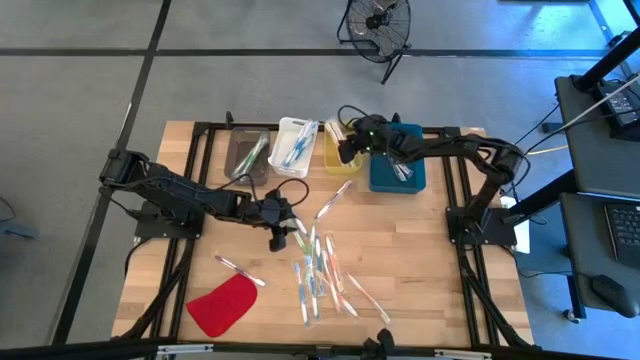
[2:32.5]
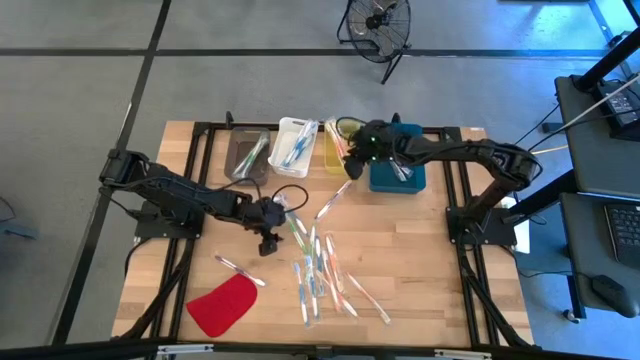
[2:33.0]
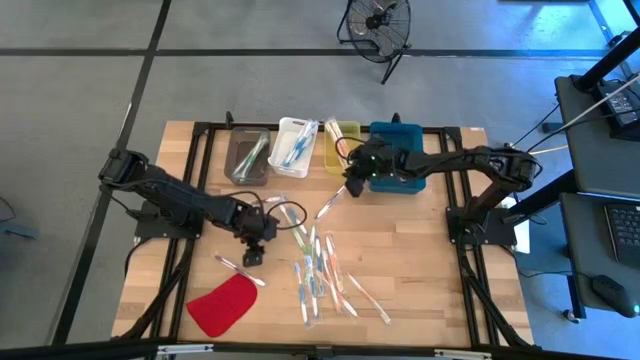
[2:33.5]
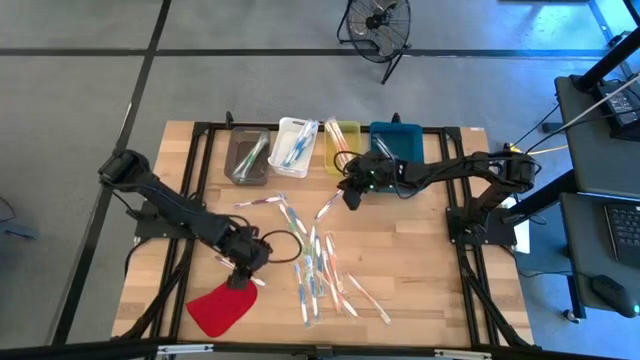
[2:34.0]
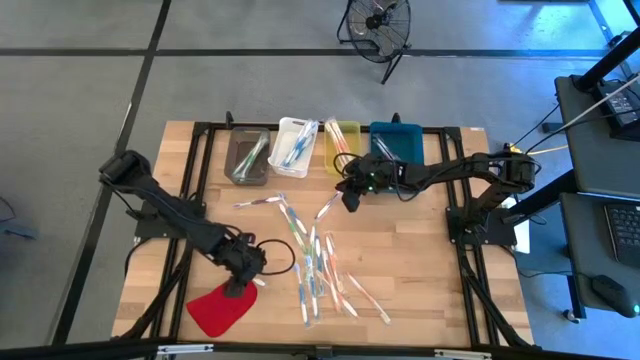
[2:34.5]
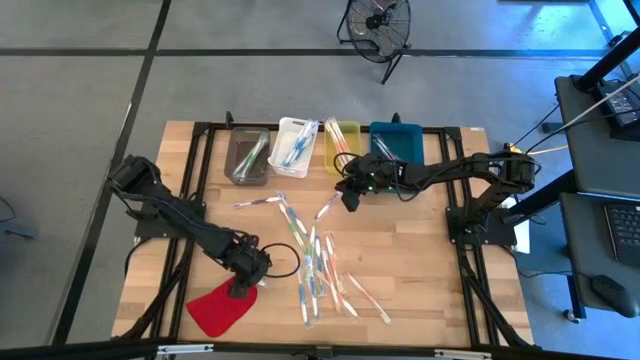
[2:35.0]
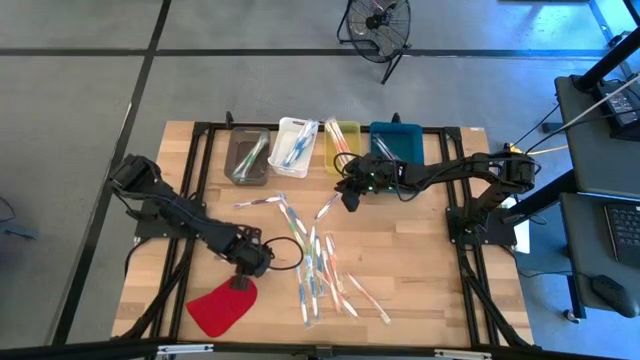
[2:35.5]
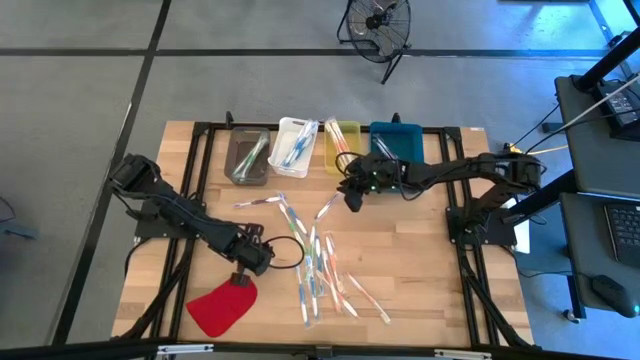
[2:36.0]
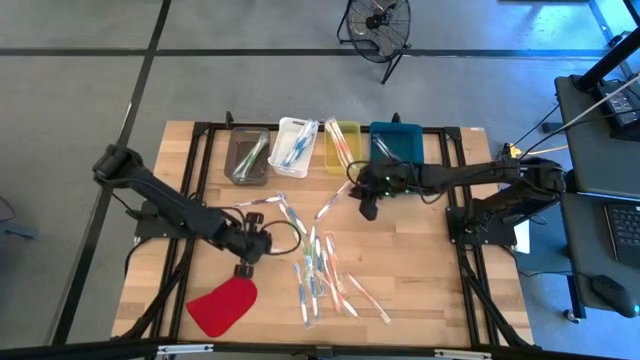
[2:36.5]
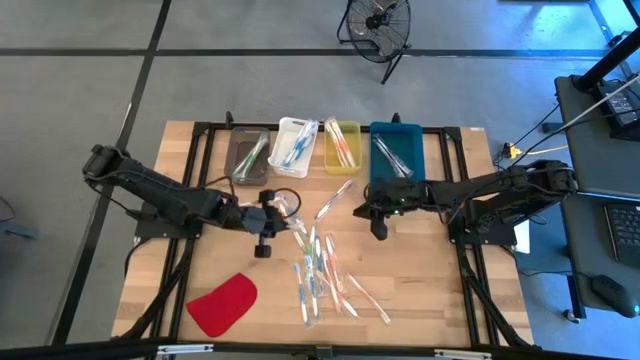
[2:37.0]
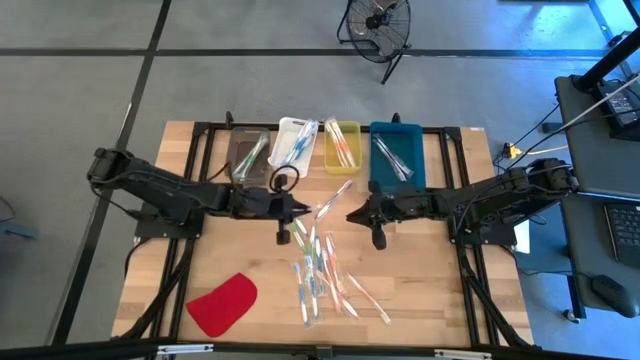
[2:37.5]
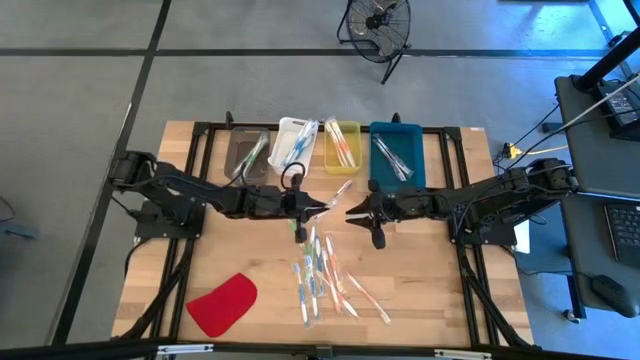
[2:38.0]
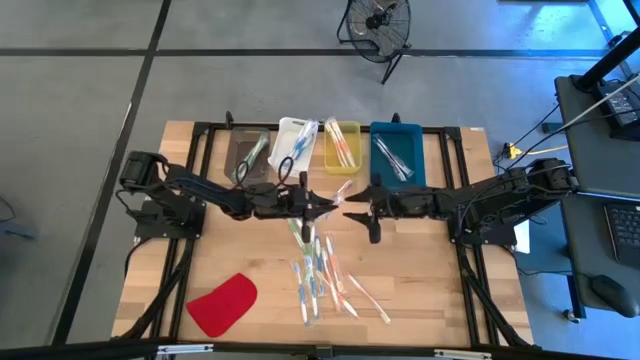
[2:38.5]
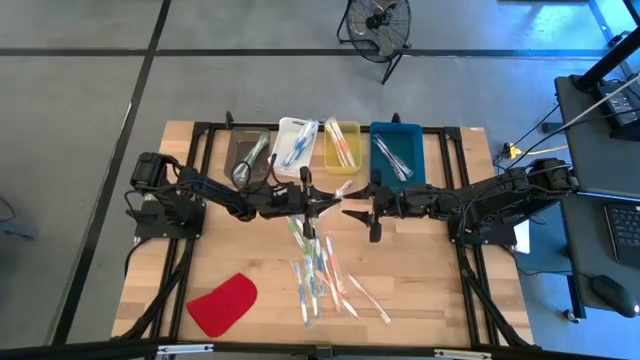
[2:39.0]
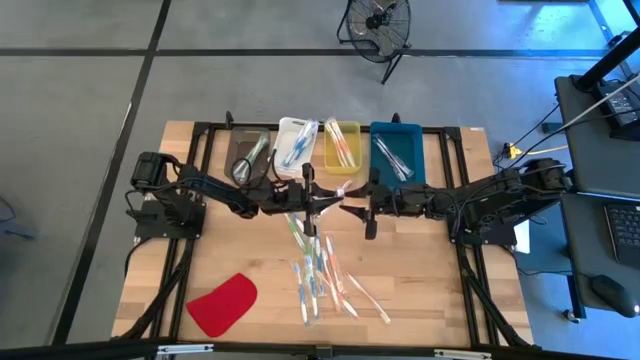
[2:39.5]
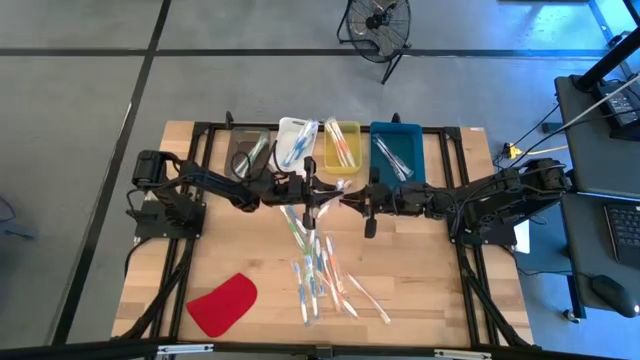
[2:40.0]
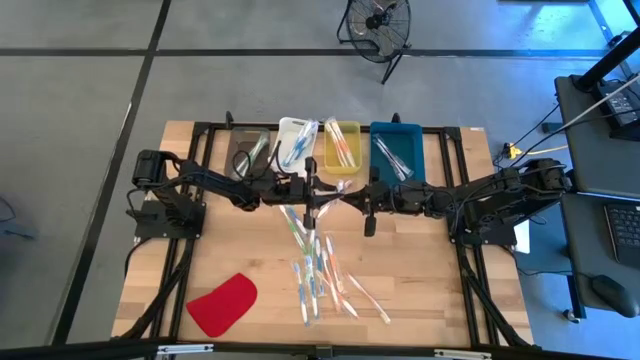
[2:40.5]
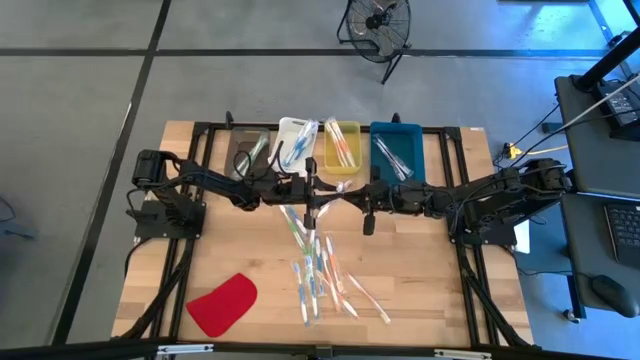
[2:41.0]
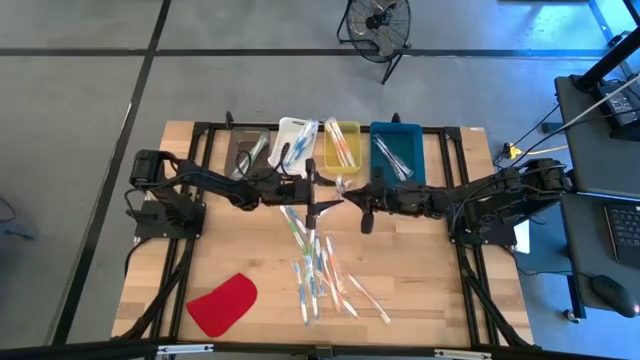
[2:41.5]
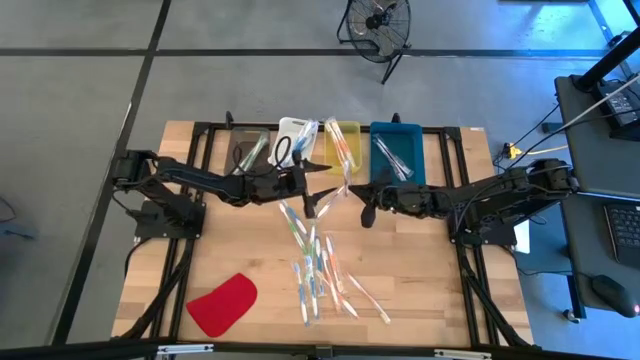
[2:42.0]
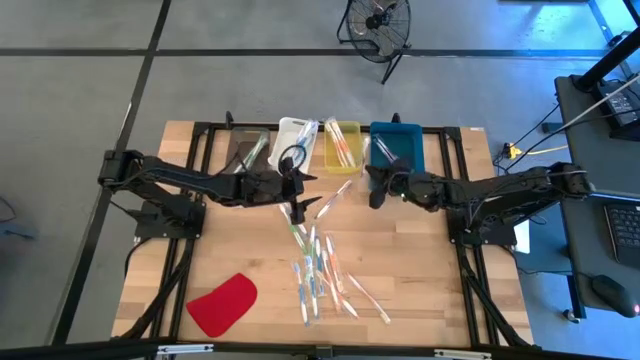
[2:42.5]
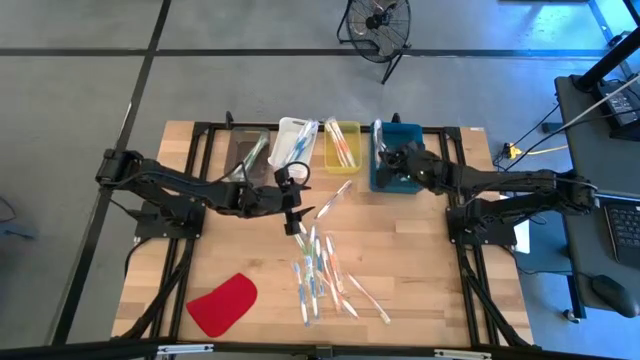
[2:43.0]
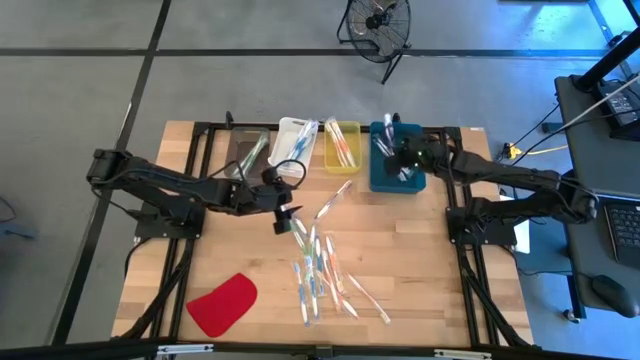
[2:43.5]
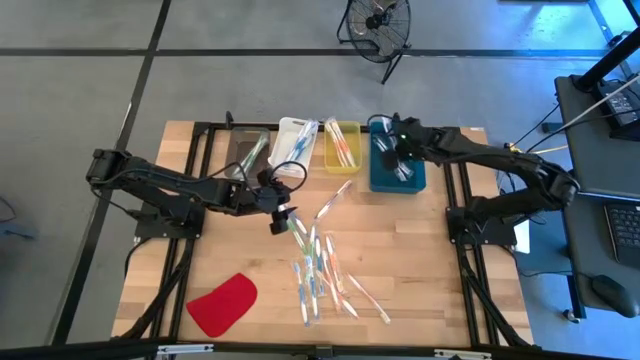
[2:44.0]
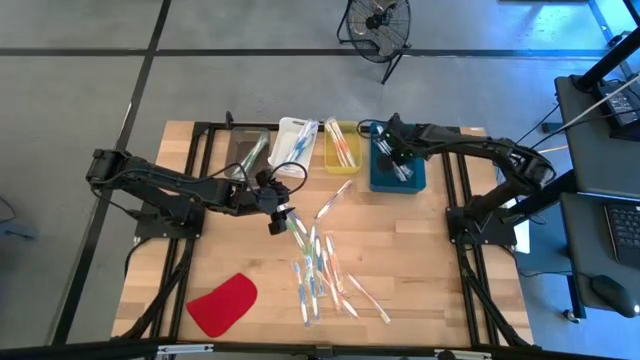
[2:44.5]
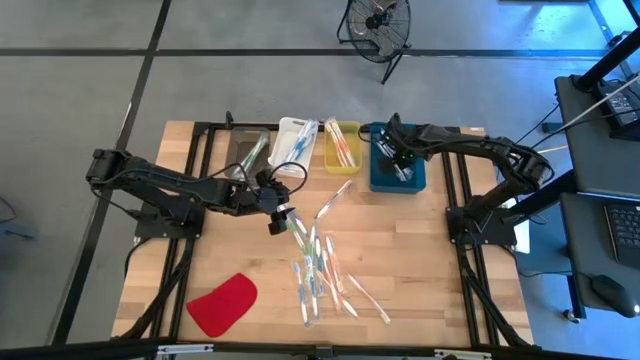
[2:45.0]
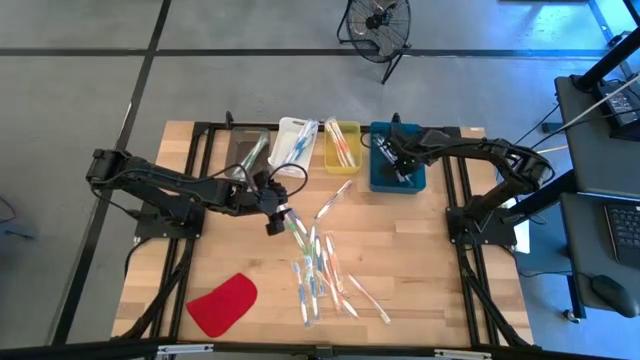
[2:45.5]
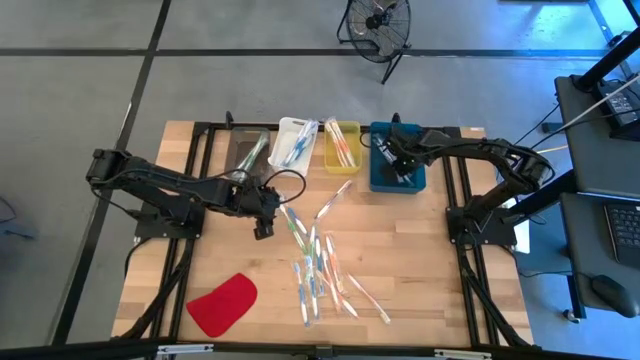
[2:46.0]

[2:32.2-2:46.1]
Task: Pick & Place Toothbrushes
Put the violet toothbrush into the blue bin

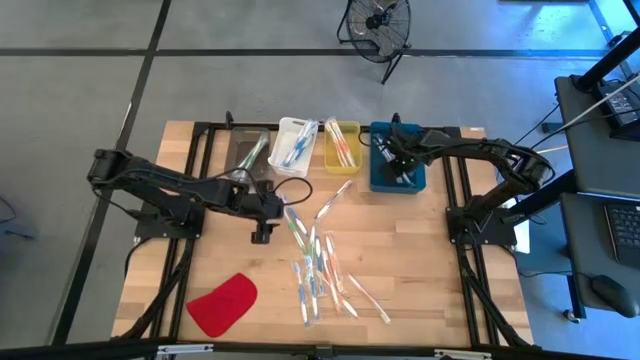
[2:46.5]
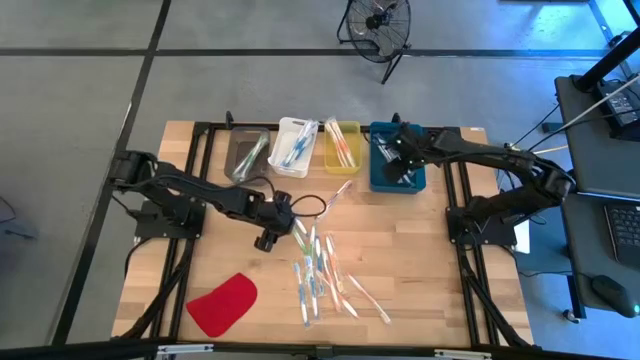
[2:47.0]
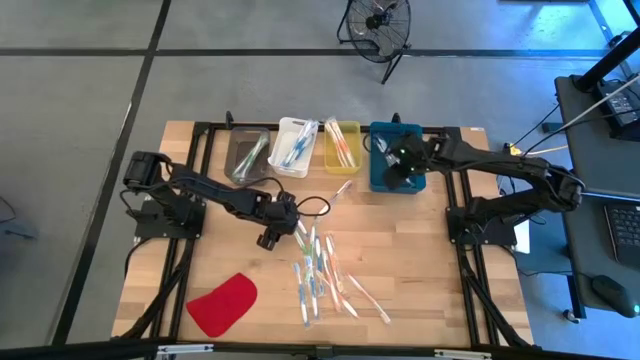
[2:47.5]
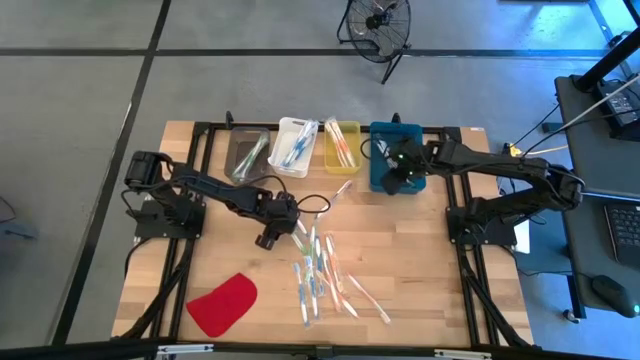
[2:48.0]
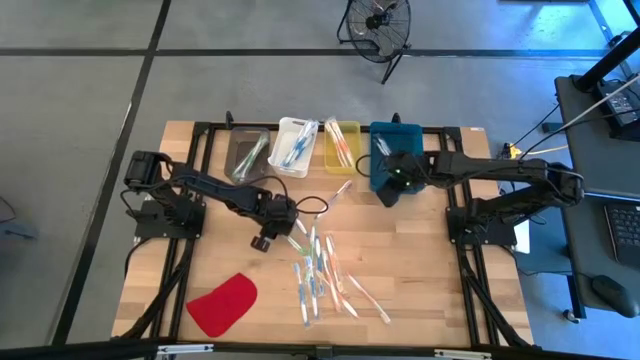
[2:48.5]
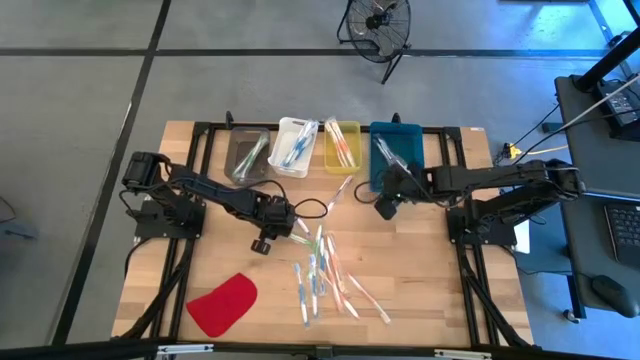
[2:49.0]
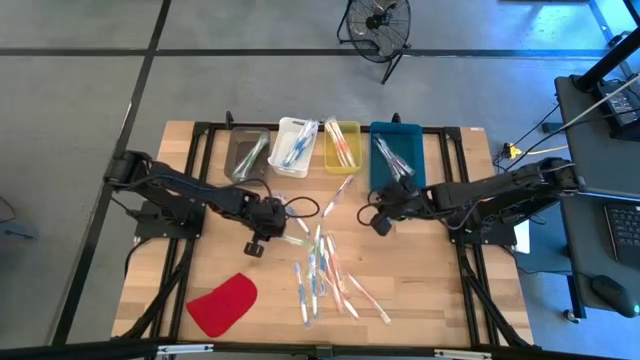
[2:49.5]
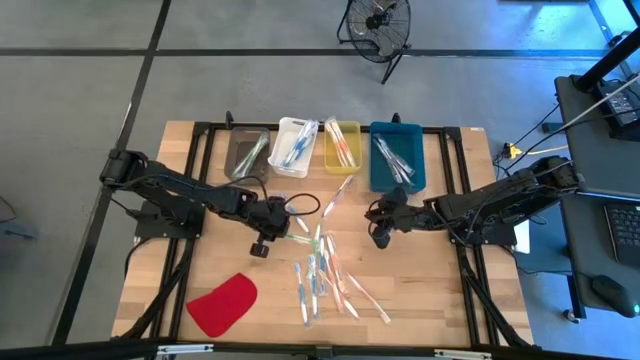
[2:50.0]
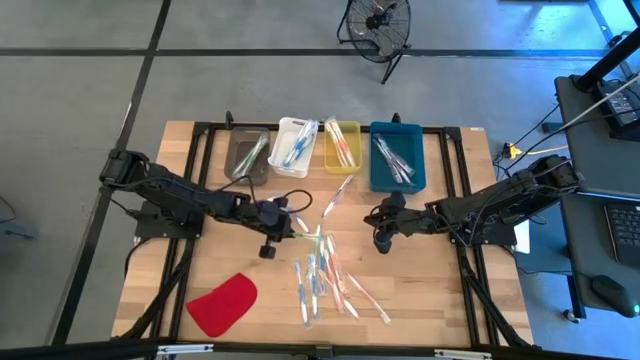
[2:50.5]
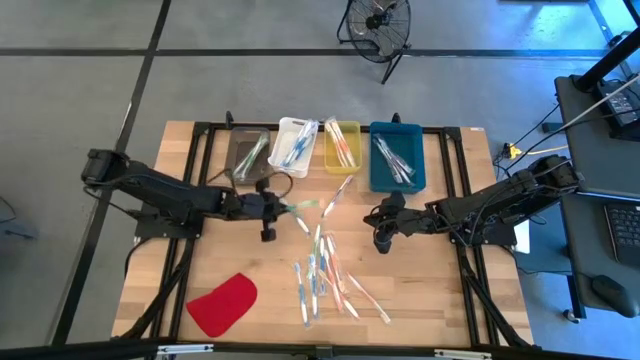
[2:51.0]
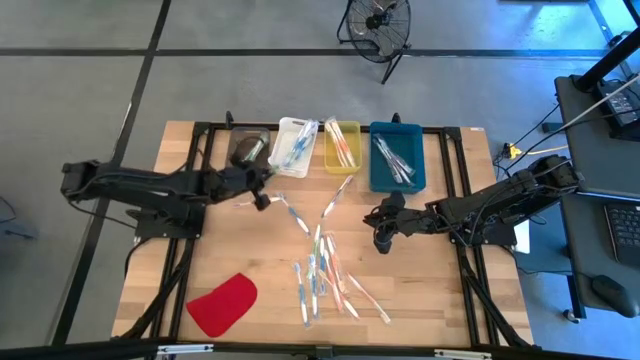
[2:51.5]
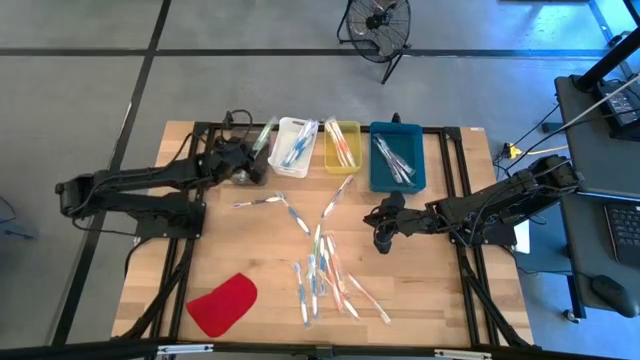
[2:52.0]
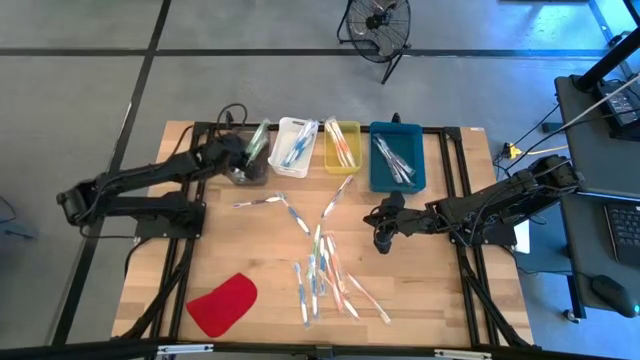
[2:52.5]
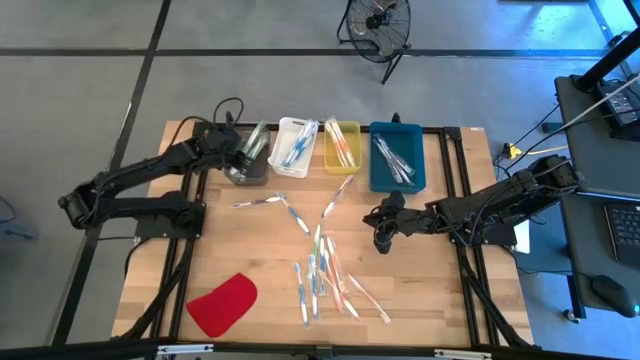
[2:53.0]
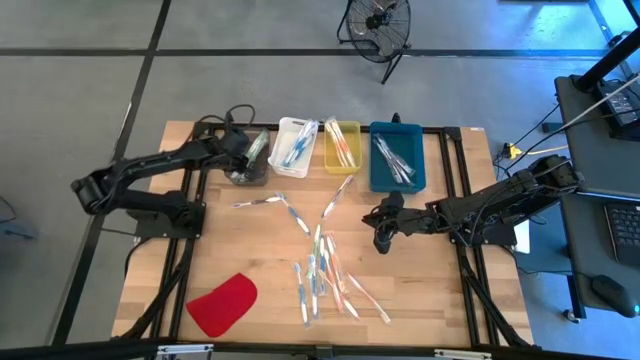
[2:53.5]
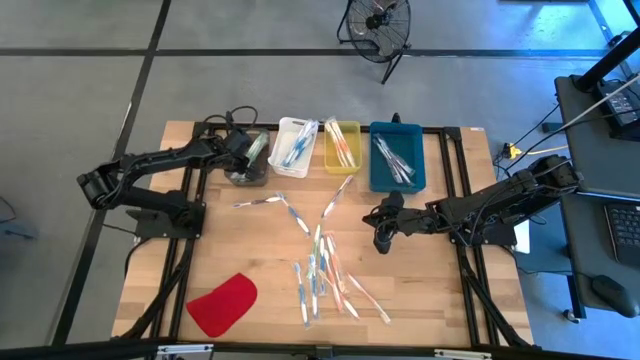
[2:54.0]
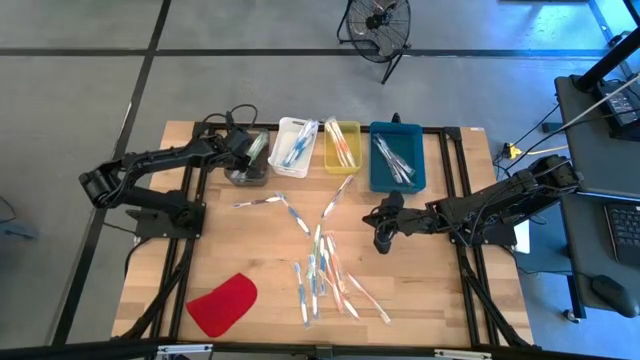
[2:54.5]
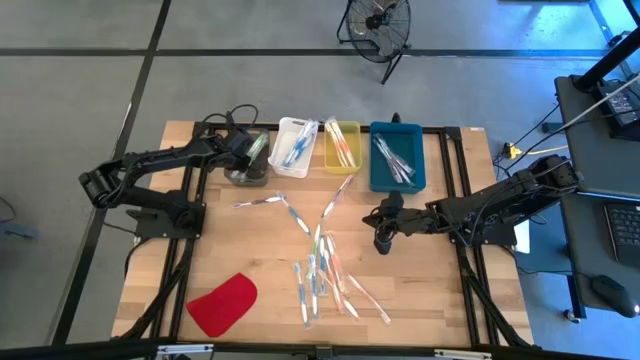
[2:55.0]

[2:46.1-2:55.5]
Put the green toothbrush into the black bin
